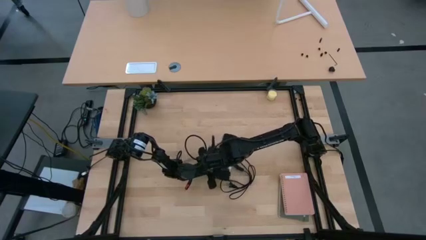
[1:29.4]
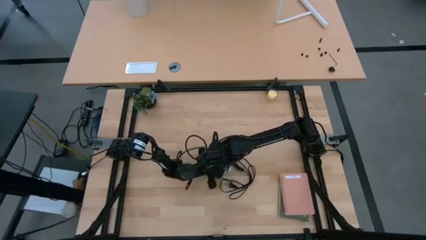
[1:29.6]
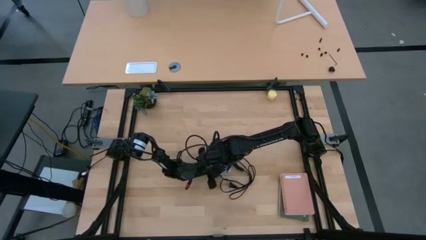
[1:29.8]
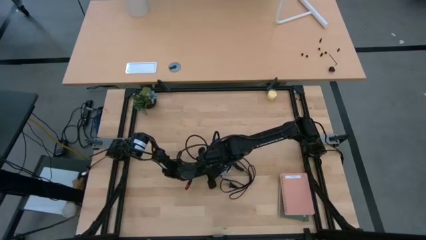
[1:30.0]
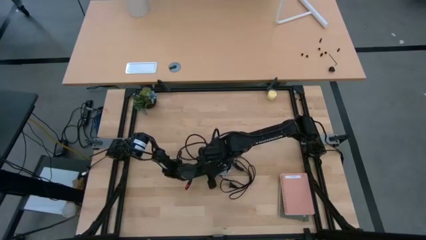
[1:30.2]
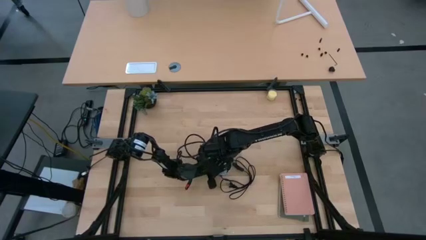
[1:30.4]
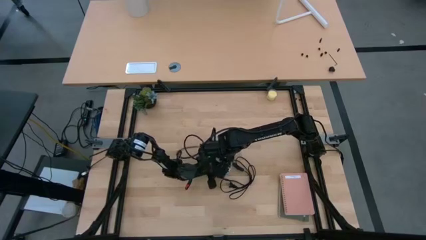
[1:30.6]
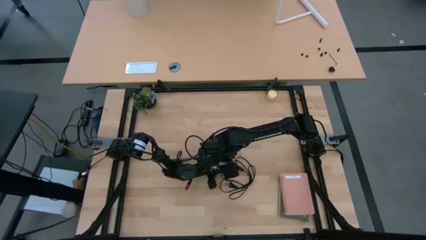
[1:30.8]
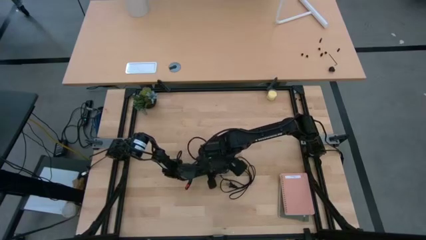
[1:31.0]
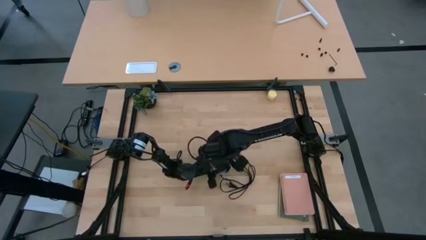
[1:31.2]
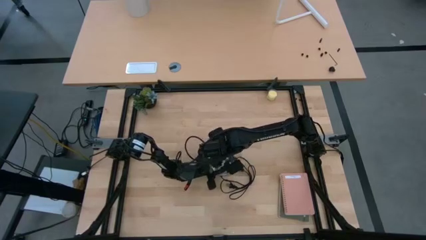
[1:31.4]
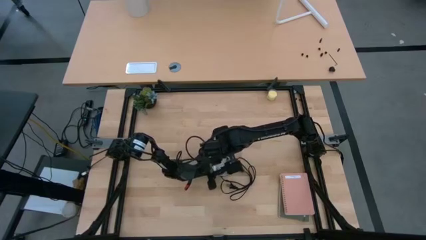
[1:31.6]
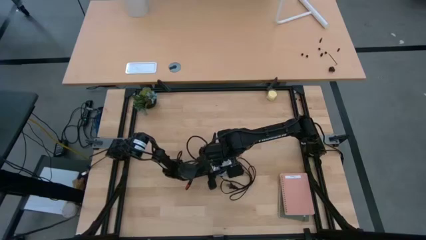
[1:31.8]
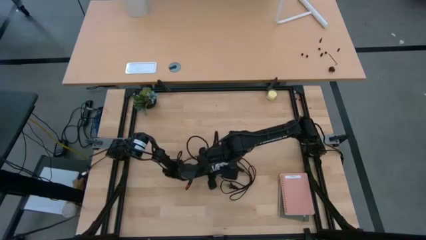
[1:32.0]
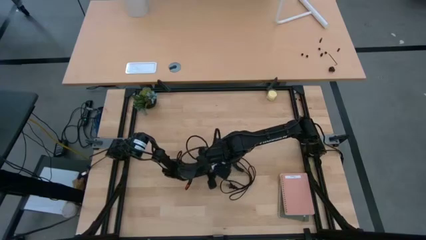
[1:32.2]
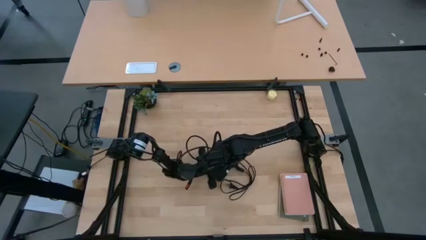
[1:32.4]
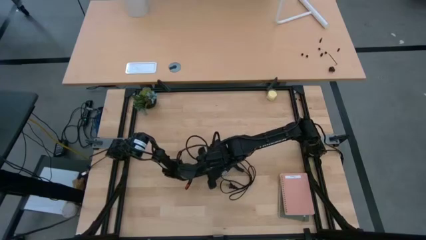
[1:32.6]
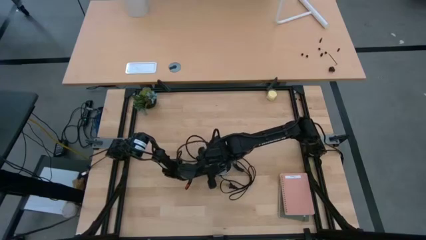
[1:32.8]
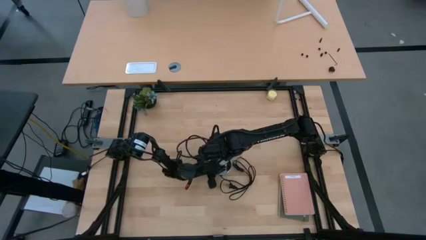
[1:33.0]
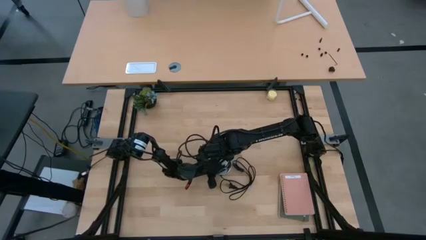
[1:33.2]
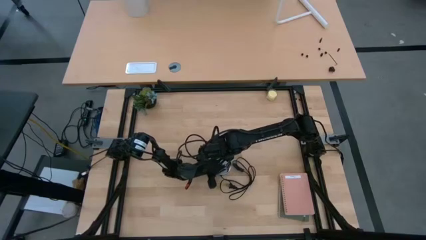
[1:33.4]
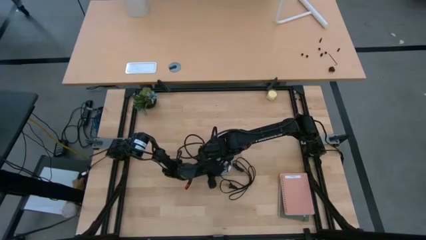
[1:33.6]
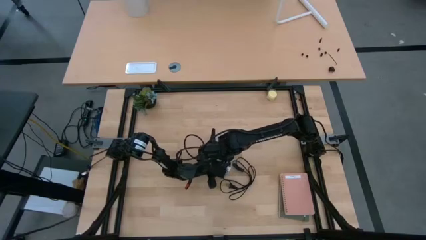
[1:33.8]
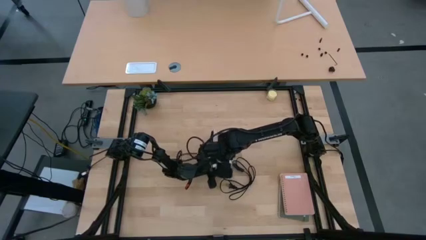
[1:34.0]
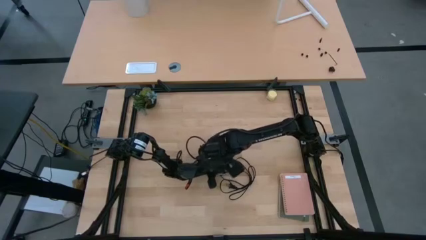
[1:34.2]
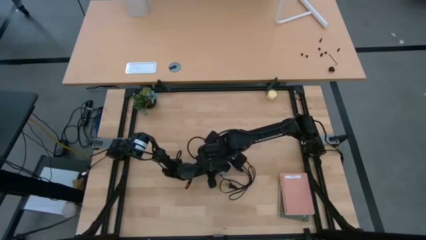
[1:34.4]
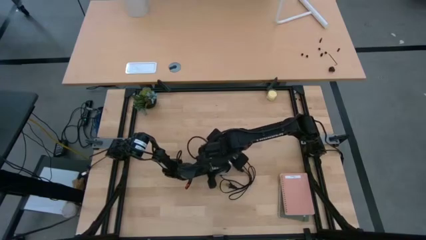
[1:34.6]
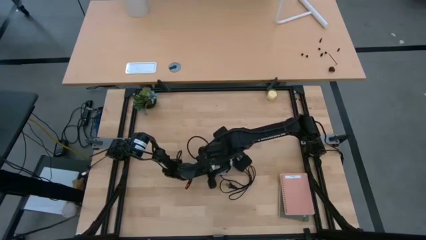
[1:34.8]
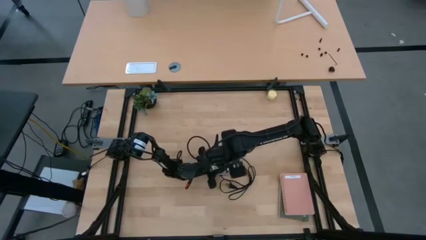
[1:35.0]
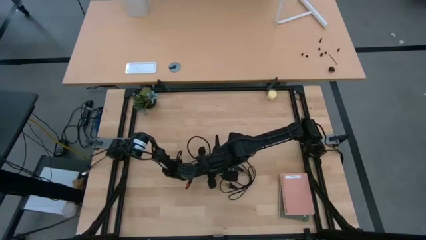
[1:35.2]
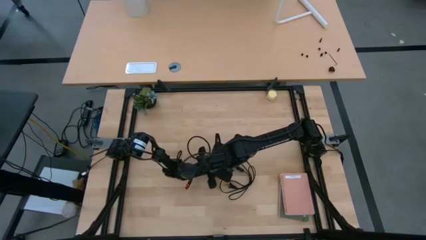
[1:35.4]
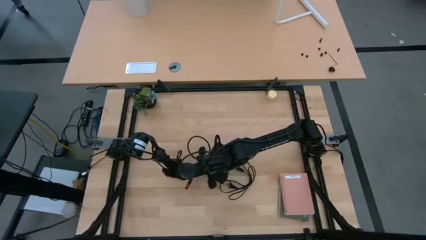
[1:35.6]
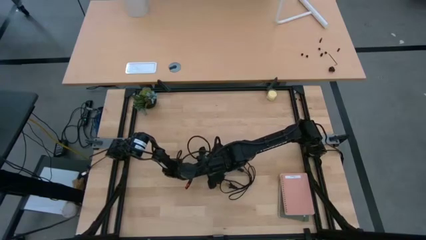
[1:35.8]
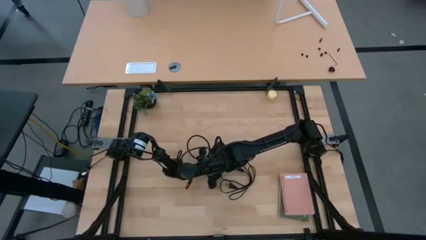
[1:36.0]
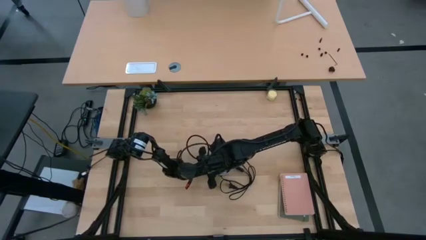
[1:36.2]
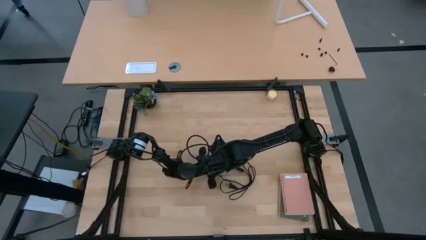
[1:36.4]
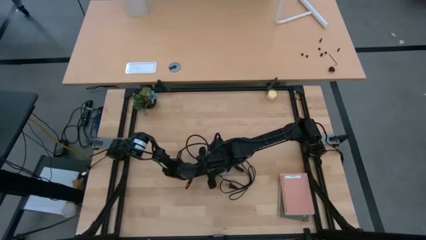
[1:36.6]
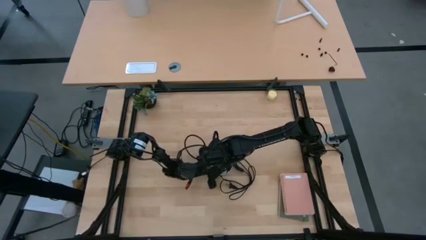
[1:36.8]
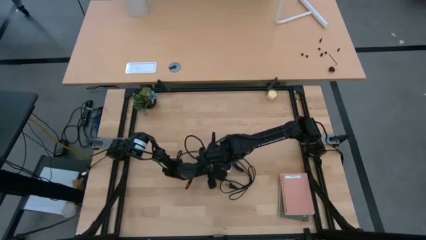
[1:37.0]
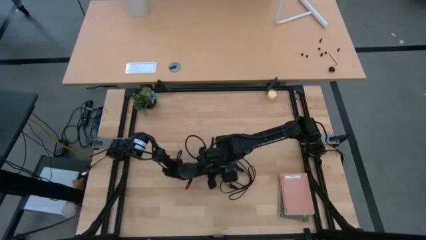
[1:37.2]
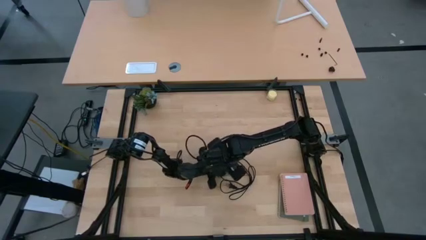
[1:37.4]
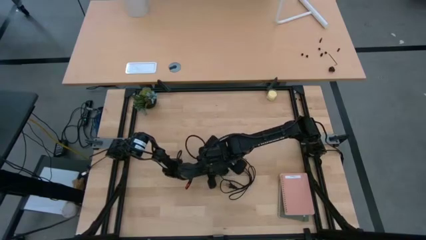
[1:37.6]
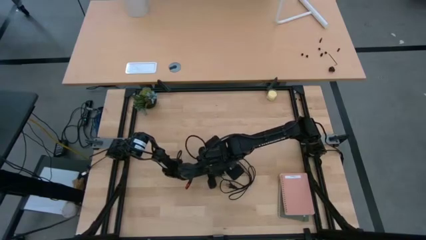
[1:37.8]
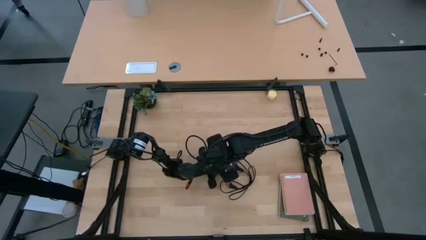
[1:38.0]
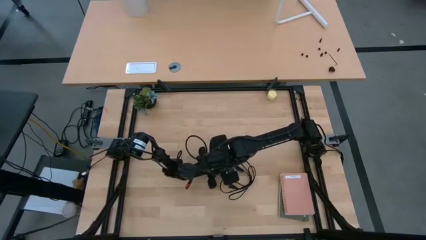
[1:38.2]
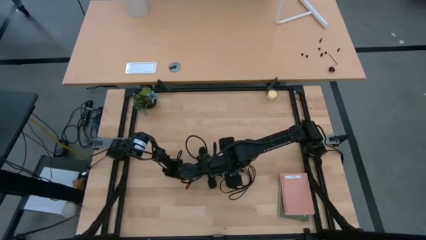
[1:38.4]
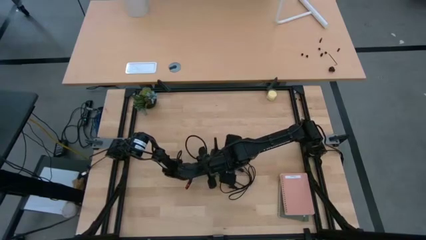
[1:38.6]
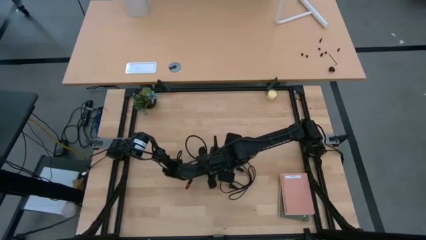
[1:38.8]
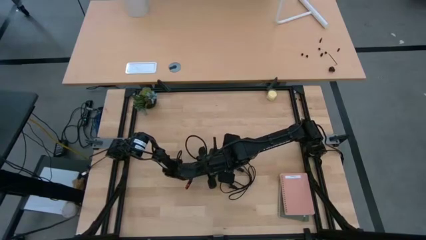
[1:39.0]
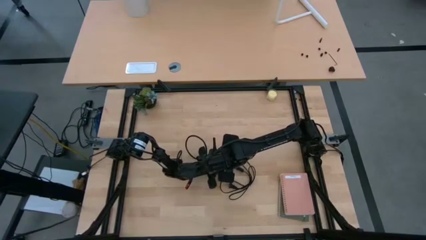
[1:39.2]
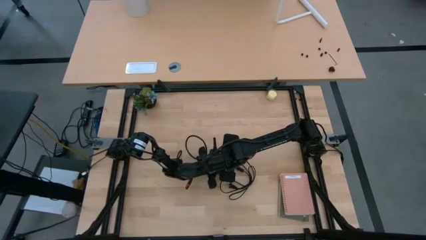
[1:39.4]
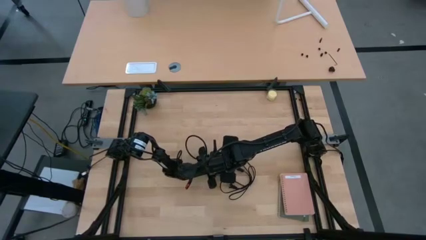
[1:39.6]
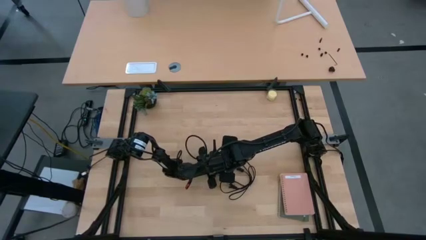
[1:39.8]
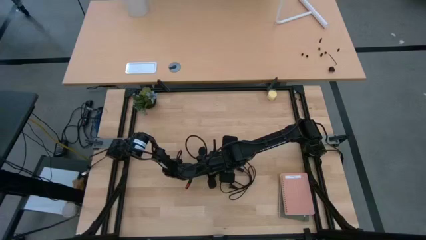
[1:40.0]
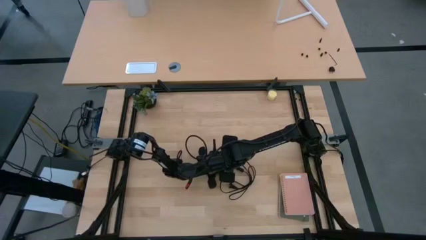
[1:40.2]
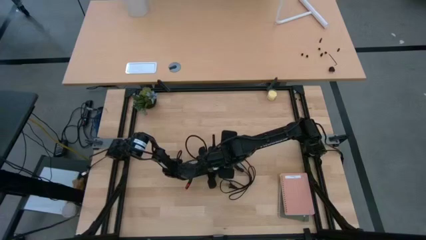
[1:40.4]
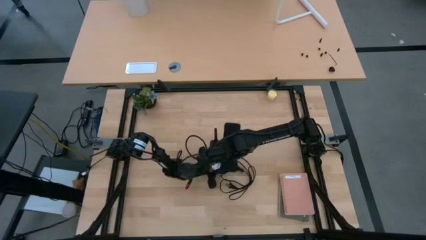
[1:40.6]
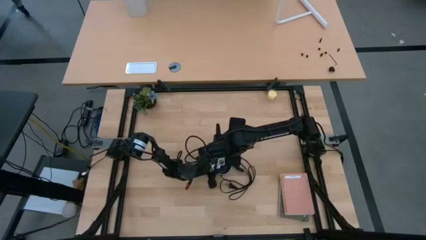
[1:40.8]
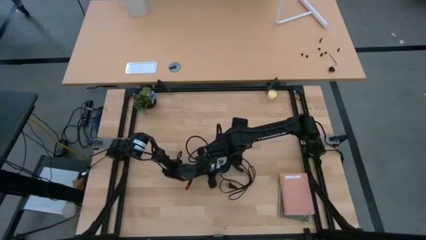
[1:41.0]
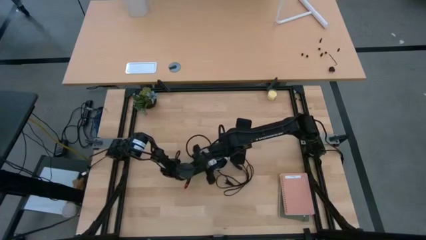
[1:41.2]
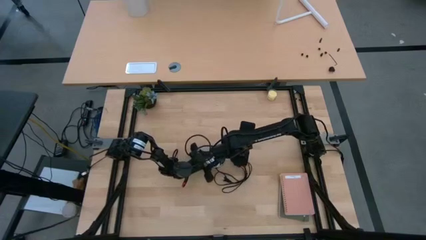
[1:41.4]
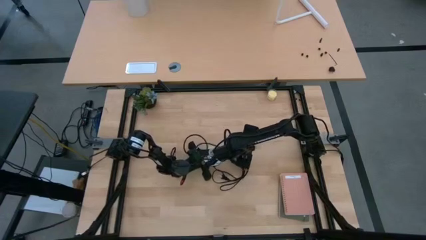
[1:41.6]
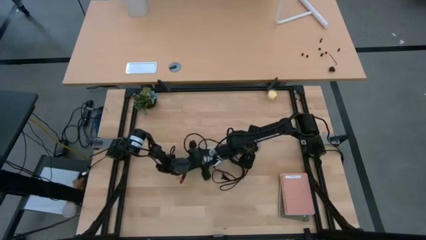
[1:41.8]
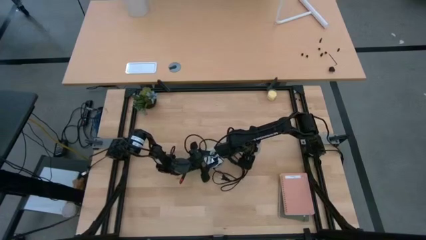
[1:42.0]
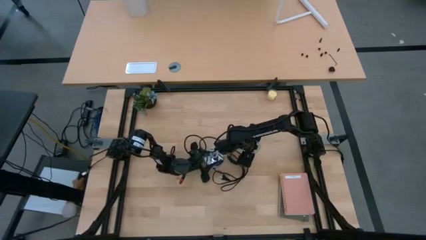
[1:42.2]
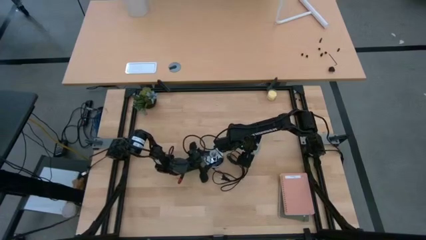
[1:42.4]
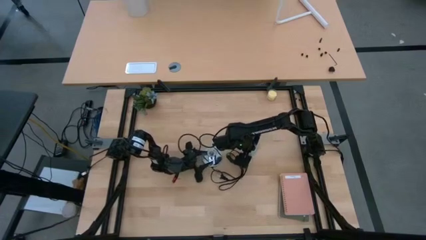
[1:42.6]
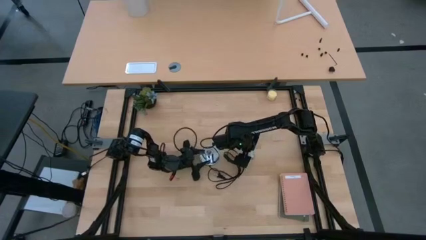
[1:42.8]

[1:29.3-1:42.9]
Task: Screw lightbulb
Remove the light bulb from the lamp

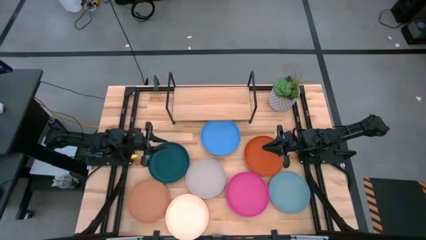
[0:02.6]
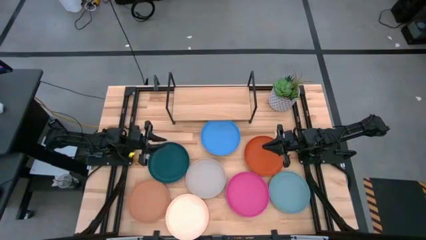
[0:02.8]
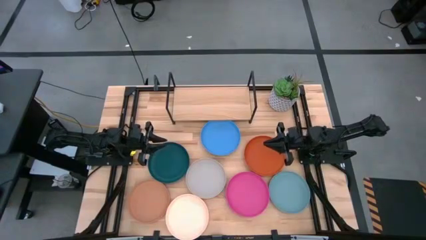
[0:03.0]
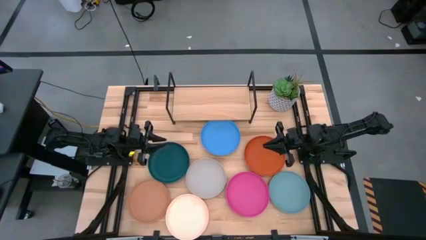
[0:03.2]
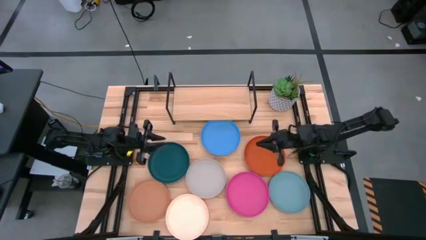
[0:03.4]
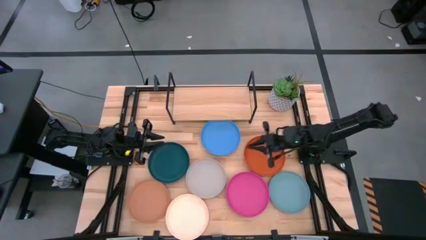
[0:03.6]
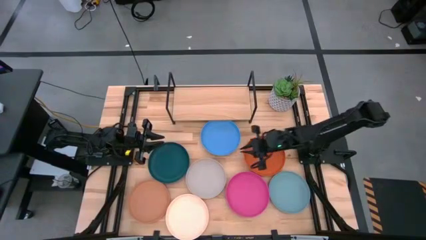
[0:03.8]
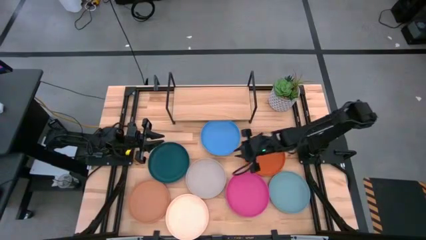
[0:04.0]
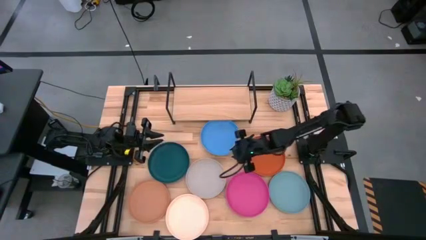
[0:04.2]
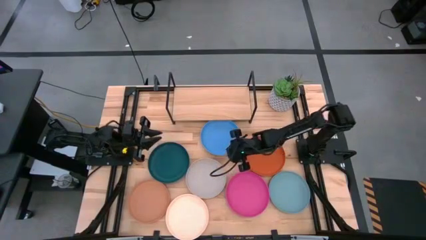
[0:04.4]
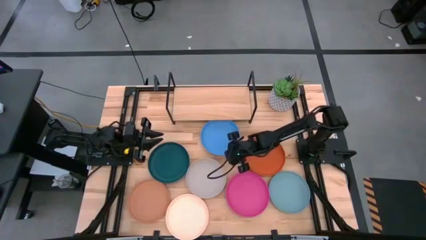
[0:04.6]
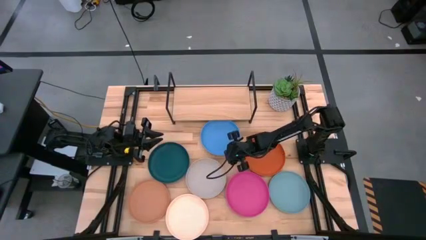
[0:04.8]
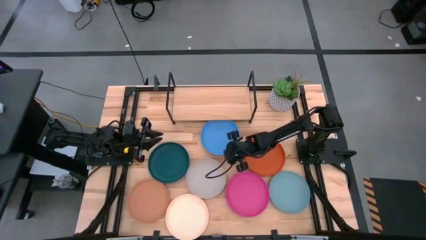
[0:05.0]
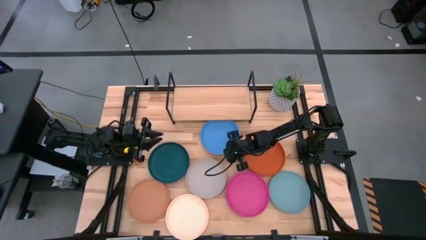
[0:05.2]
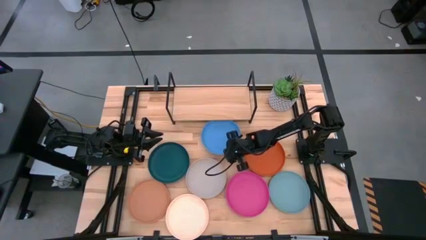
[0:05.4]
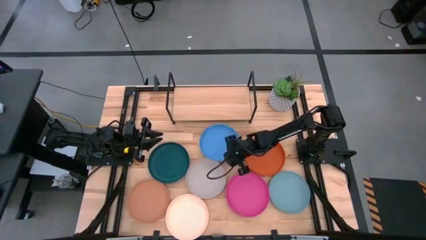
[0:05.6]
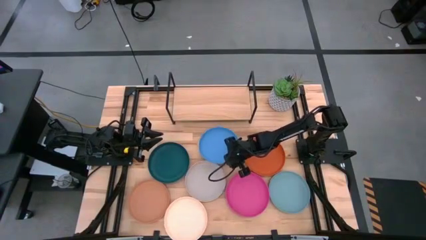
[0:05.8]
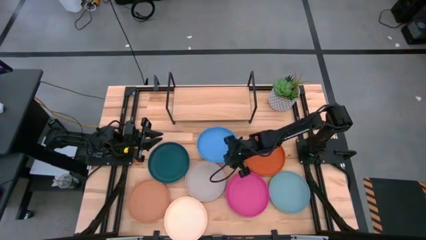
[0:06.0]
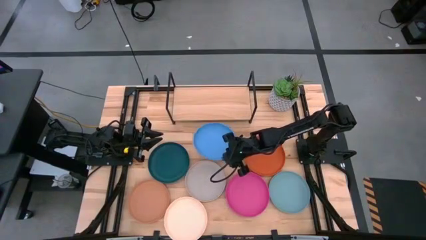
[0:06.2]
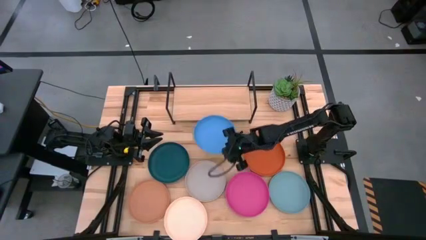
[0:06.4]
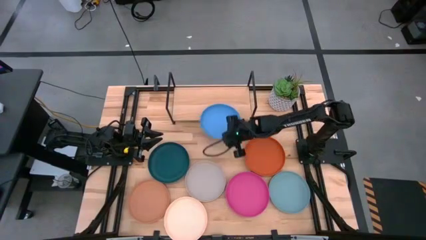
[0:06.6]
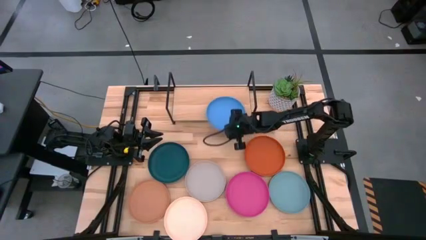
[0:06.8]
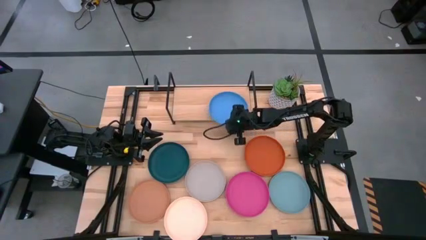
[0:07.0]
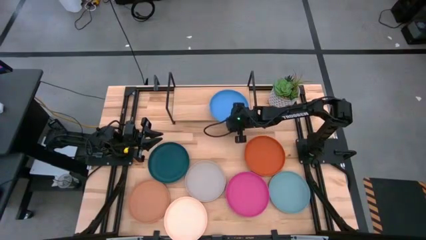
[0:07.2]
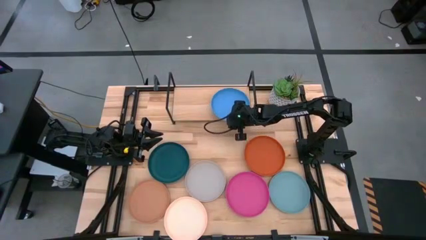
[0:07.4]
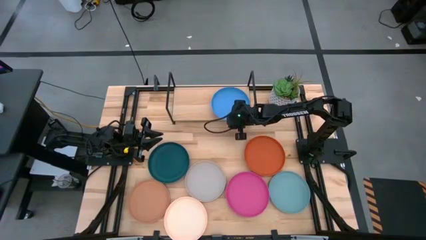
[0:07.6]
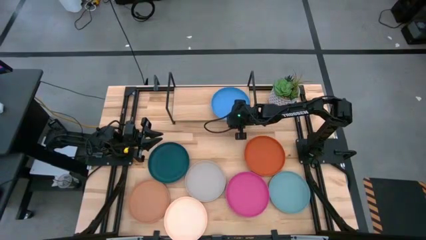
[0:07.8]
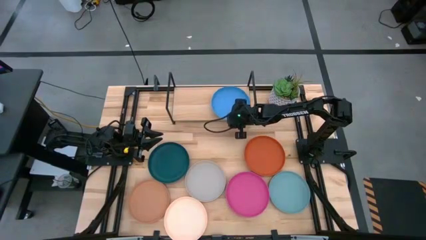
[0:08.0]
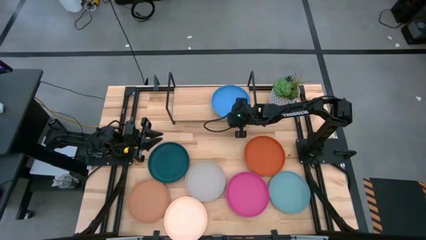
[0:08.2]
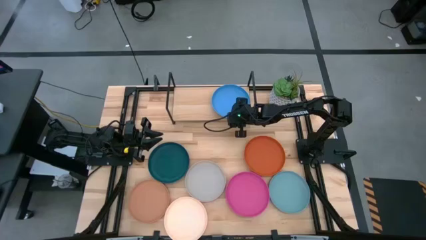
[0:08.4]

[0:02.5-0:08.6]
Task: Place and stack plates onto a shelf
Put the blue plate on the shelf
